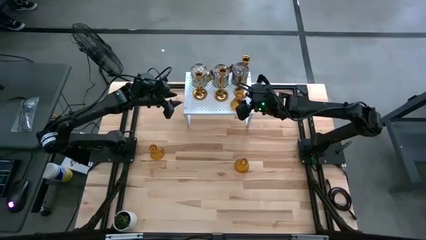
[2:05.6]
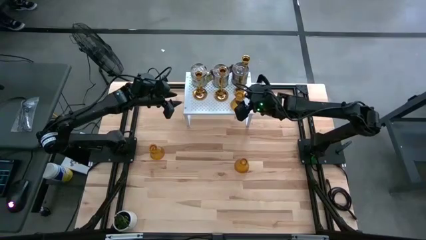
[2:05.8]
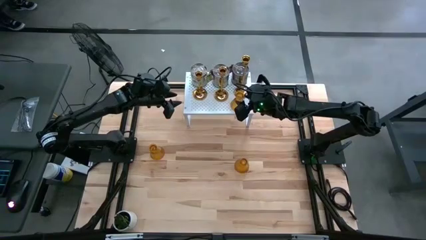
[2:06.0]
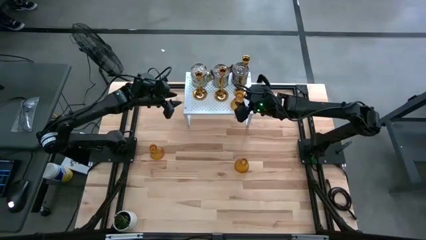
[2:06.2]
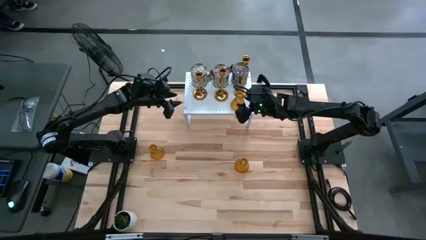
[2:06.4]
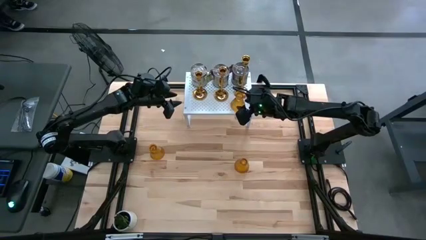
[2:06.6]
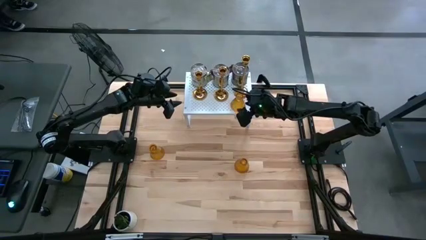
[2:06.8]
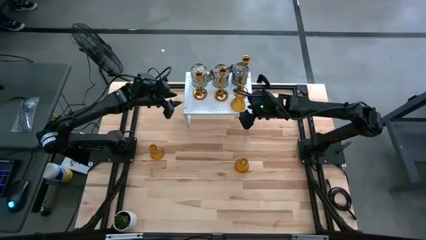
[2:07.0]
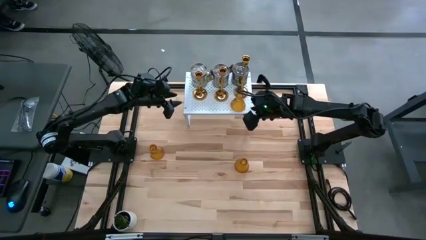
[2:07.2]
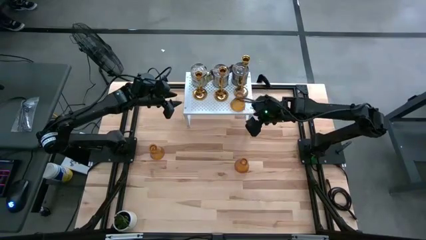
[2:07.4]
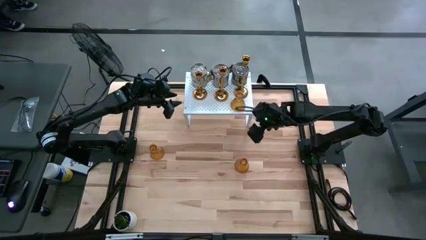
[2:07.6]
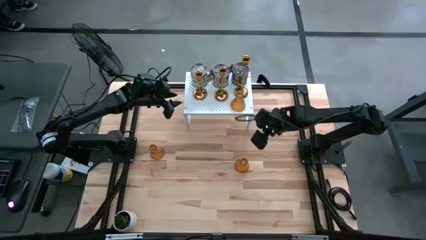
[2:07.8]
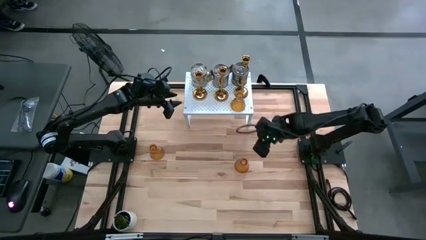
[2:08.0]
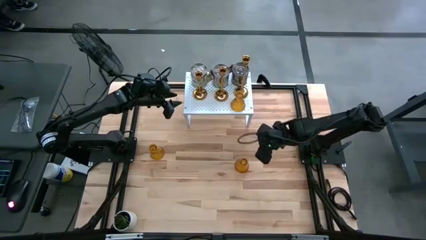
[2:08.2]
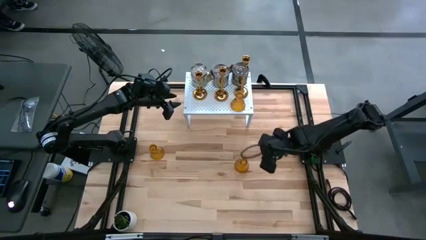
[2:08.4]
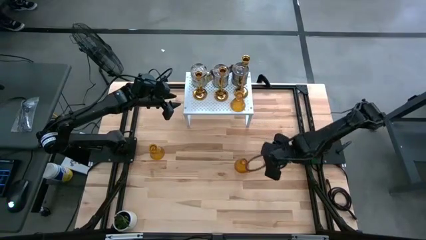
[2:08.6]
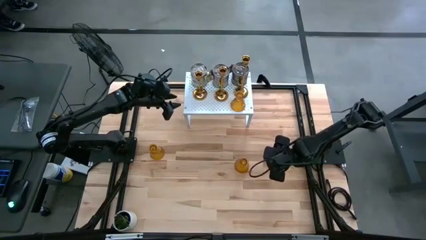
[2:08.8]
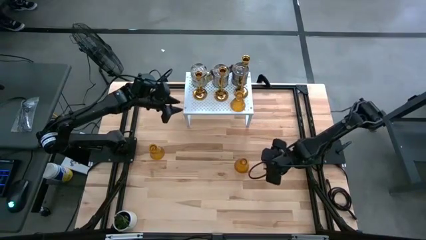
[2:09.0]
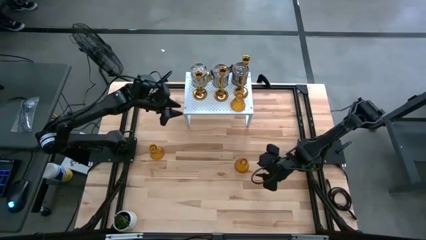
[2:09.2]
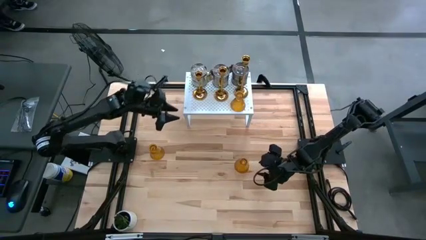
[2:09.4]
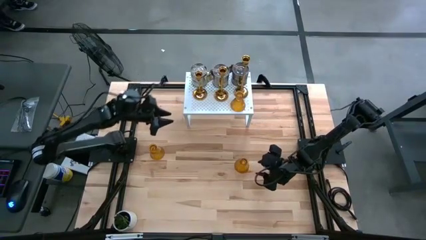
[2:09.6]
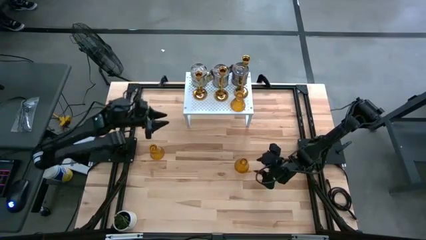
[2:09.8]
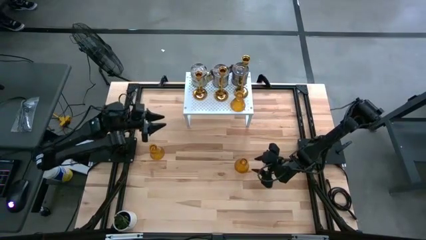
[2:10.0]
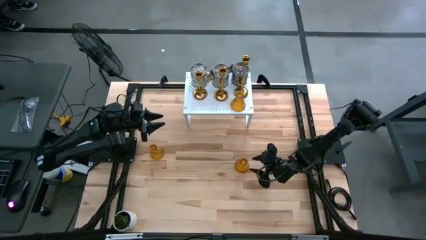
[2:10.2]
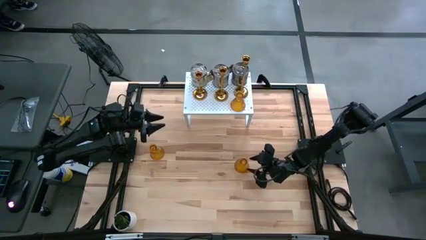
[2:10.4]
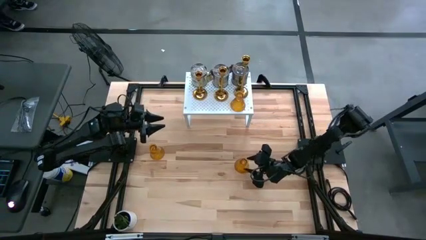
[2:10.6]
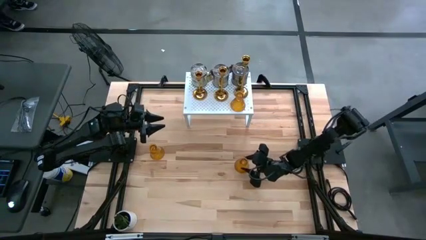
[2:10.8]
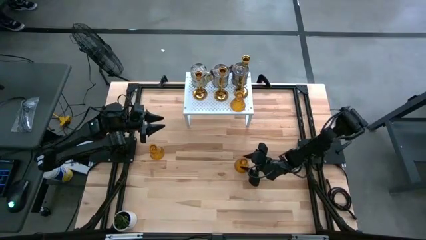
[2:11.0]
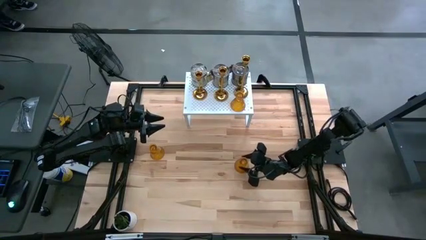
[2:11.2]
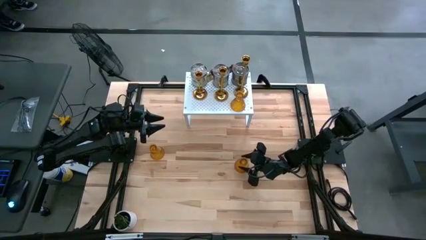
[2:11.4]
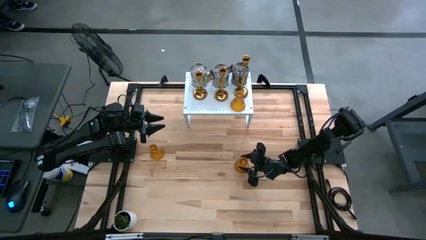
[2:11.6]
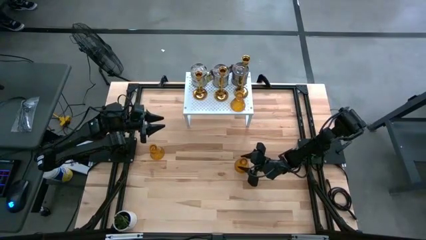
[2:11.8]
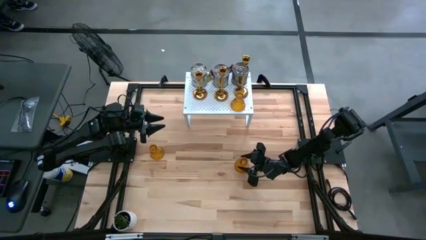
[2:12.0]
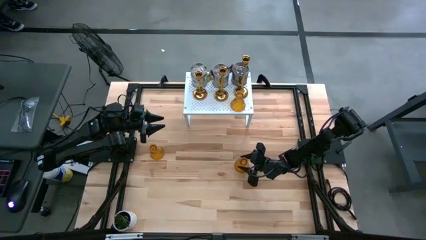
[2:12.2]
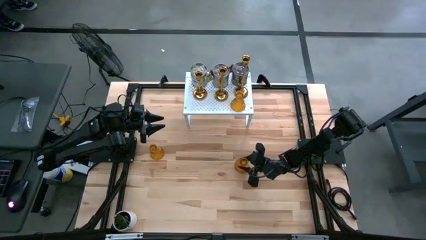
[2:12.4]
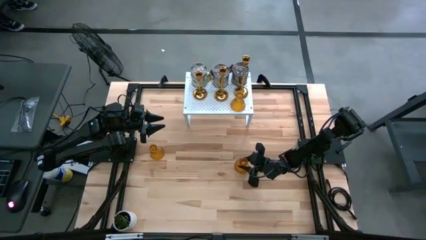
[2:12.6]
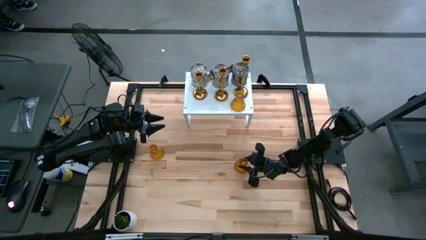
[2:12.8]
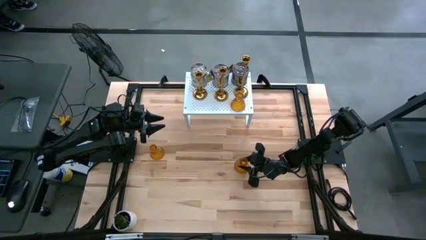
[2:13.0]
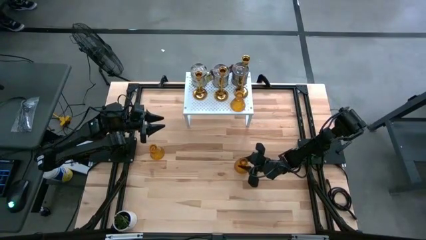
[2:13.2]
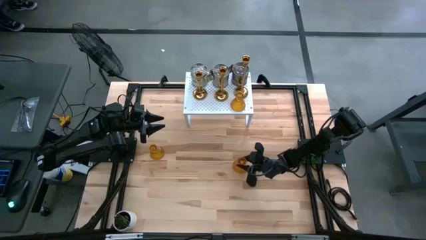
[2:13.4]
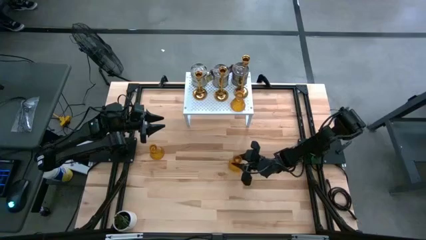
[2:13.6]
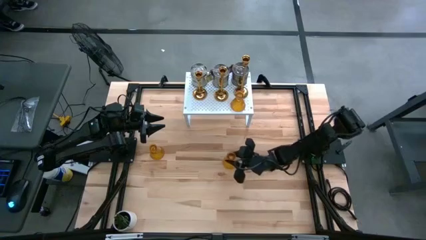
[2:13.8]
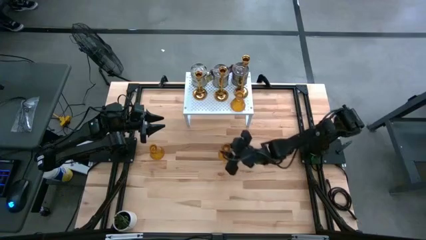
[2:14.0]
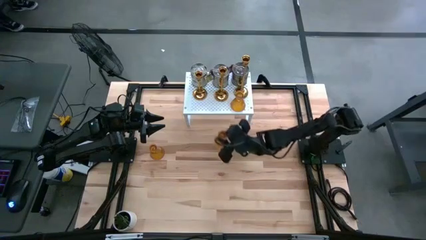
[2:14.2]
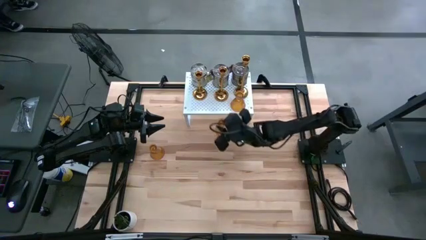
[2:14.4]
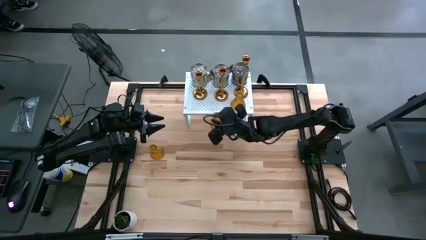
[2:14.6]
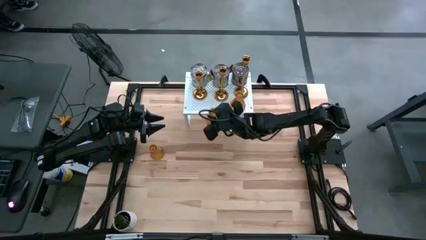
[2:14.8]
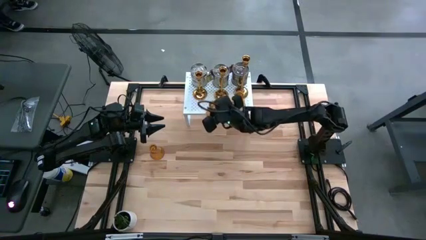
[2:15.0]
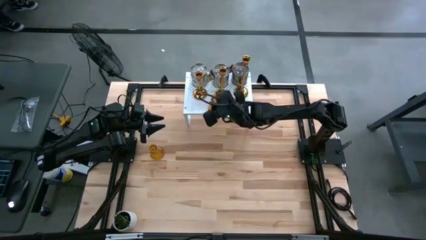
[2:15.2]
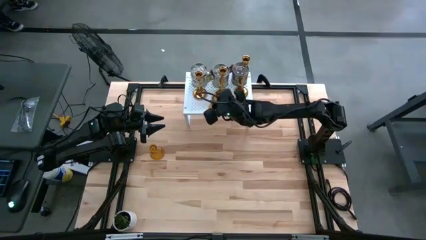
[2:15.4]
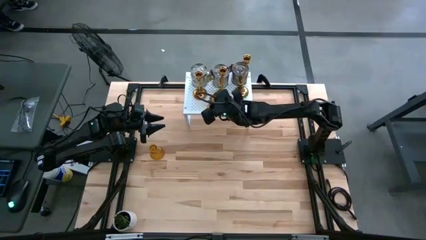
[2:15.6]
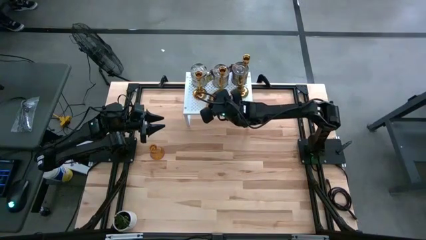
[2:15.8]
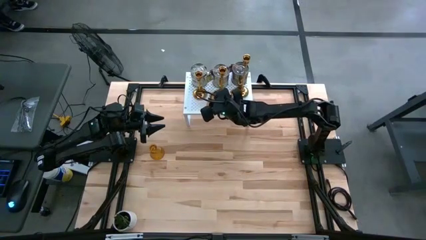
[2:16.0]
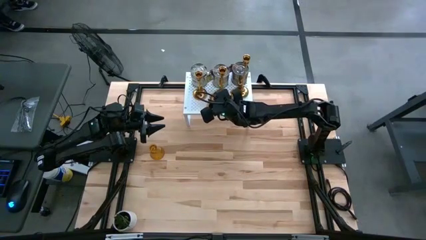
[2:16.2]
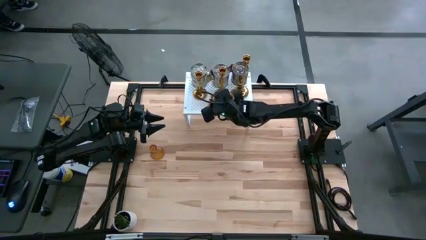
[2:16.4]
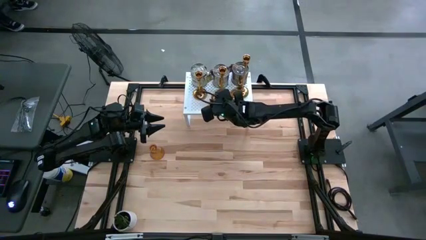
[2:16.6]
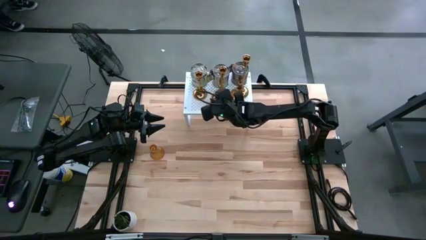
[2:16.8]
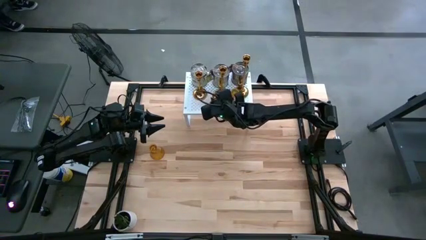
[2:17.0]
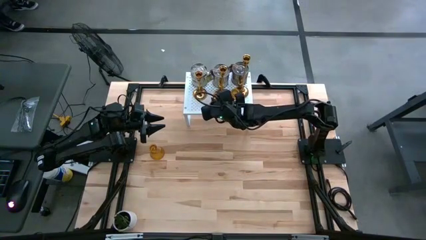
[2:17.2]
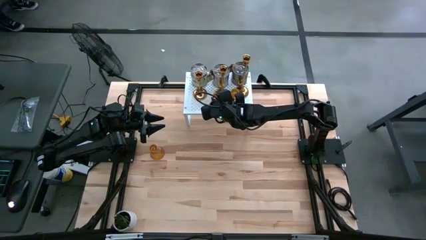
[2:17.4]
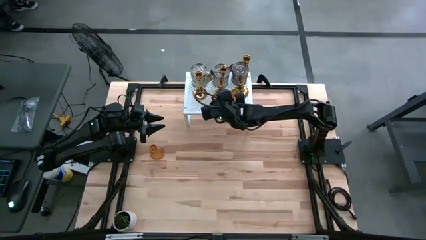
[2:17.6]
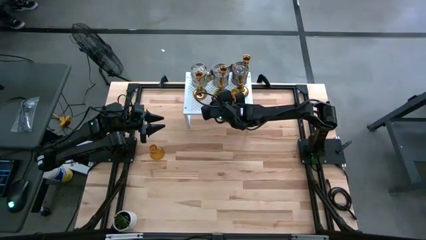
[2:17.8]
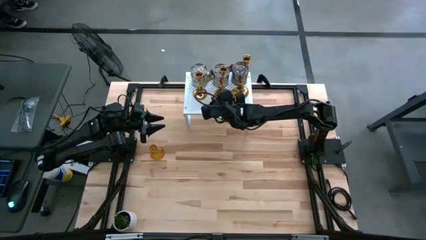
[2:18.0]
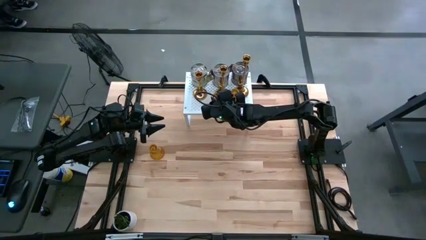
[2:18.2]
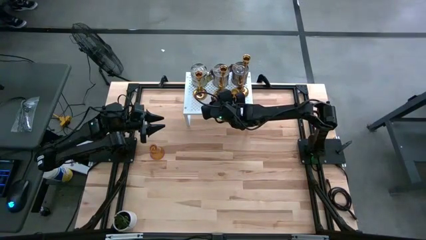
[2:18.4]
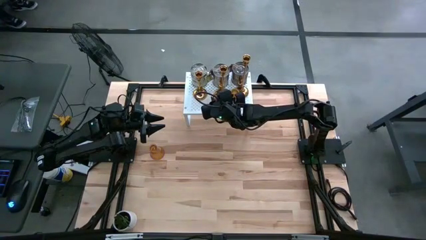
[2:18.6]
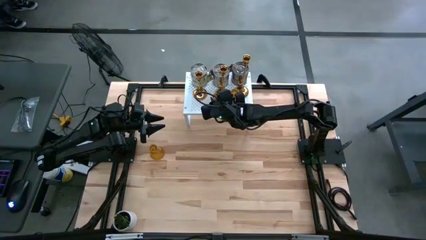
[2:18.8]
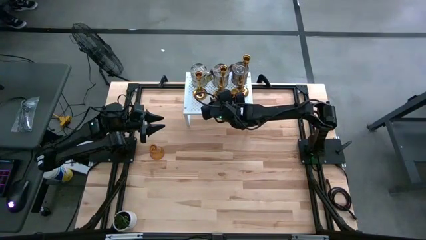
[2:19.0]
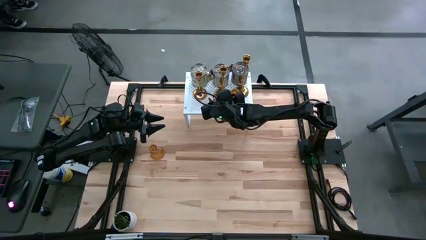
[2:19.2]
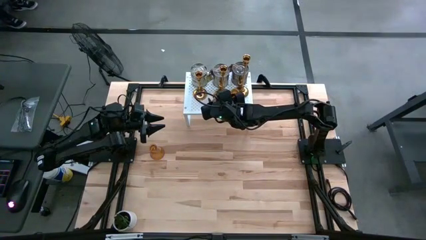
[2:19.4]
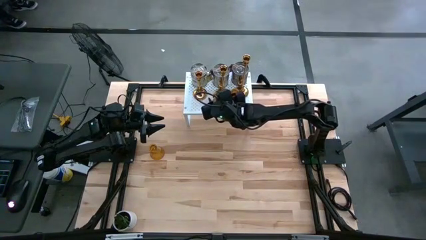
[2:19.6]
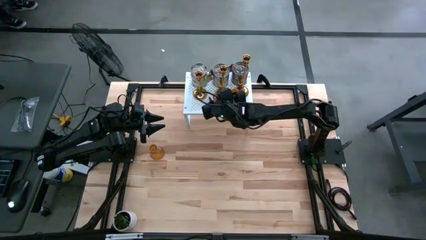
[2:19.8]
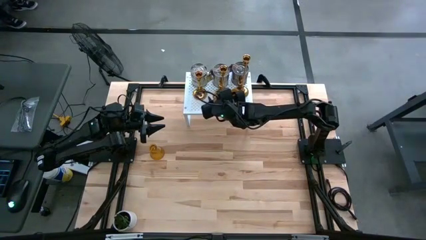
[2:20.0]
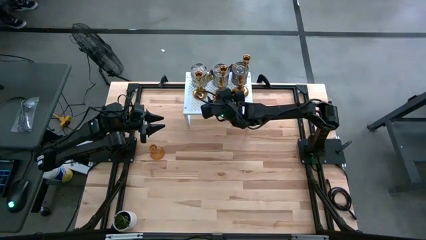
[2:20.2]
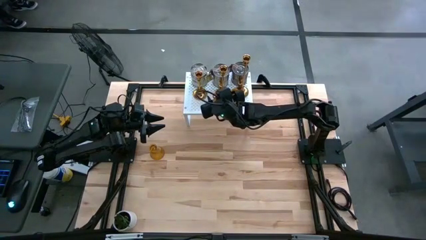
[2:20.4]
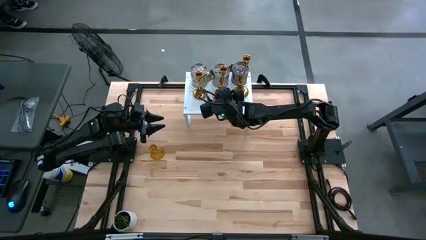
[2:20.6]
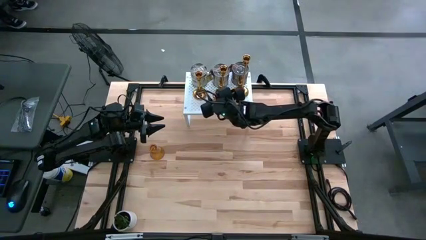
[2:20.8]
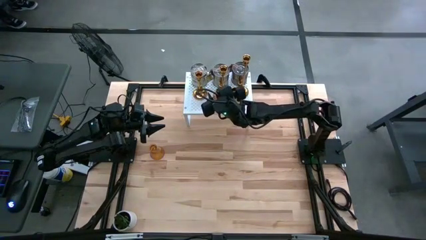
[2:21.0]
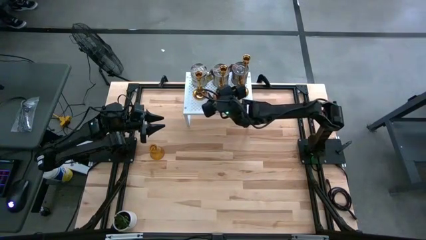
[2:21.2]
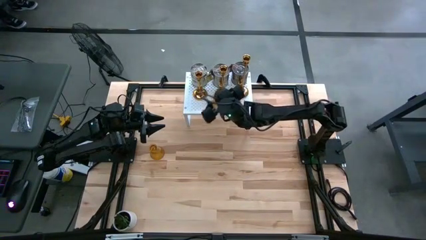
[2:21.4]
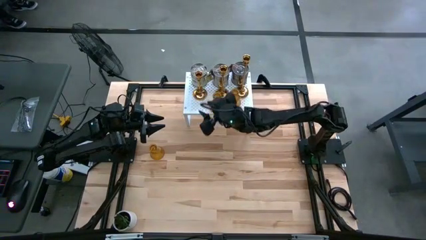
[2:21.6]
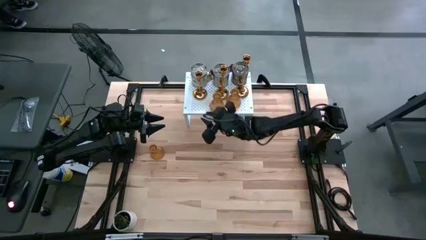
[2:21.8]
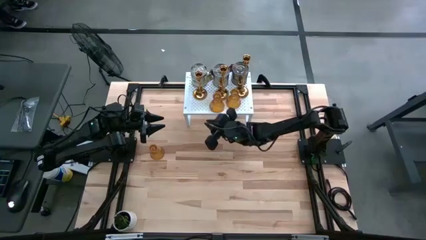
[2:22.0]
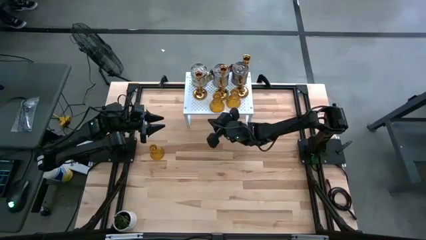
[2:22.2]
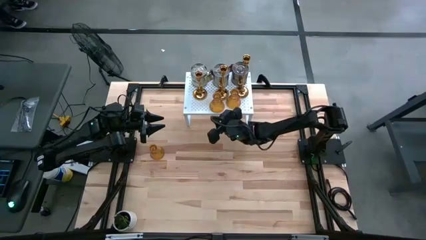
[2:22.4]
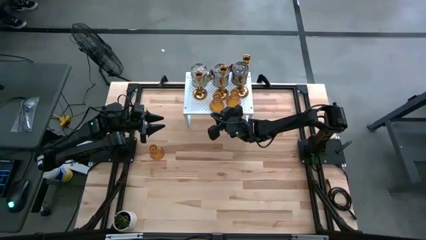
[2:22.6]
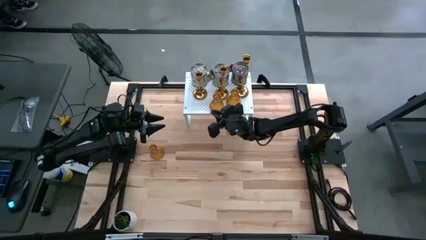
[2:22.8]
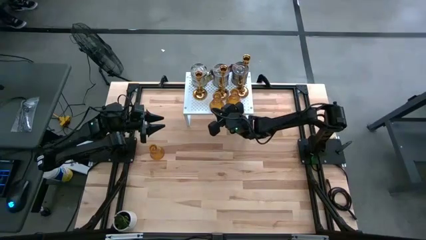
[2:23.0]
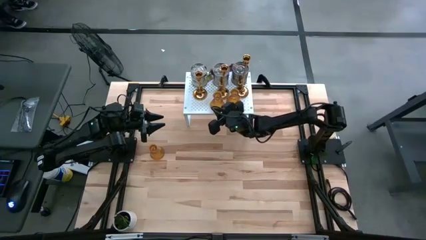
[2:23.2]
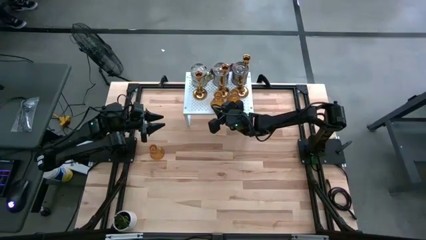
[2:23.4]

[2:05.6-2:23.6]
Task: Pick & Place candle stick holders
Put the right yellow candle holder aligned with the other yellow candle holder on the shelf
